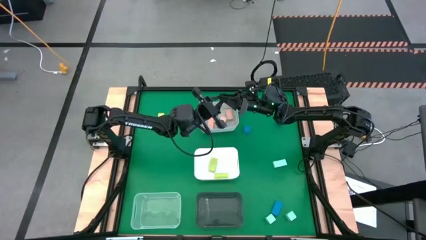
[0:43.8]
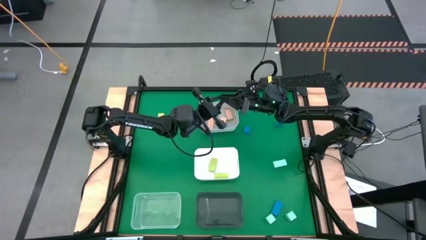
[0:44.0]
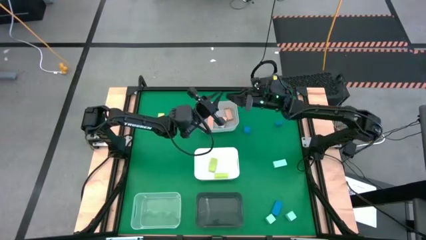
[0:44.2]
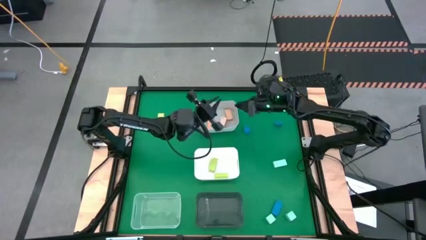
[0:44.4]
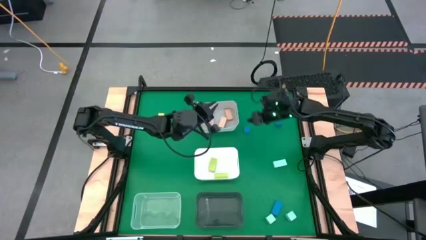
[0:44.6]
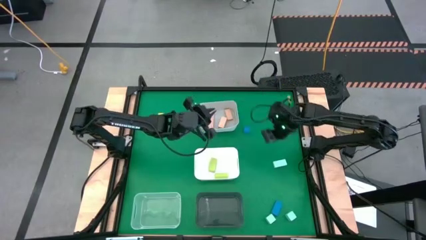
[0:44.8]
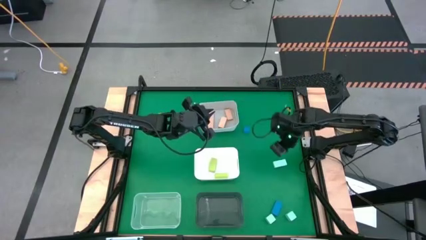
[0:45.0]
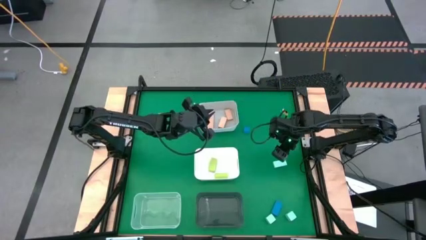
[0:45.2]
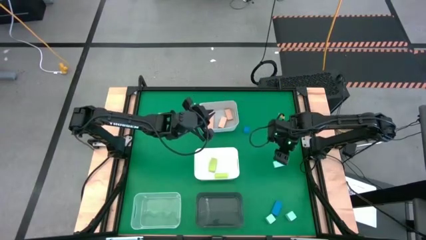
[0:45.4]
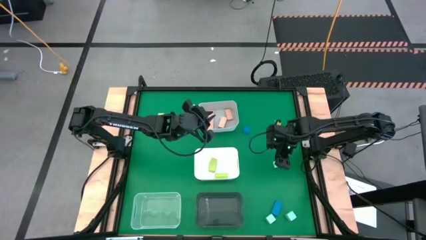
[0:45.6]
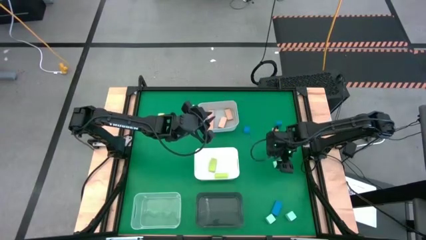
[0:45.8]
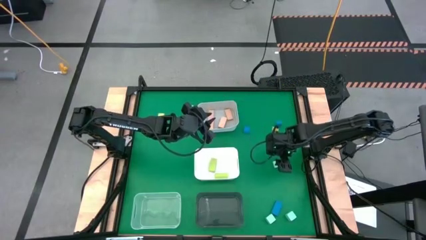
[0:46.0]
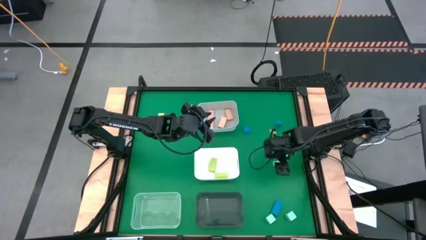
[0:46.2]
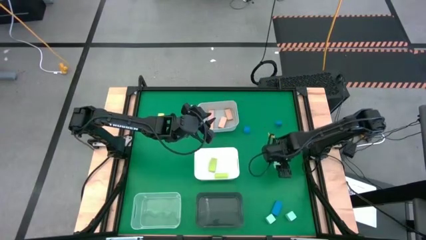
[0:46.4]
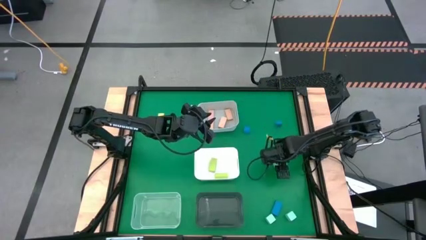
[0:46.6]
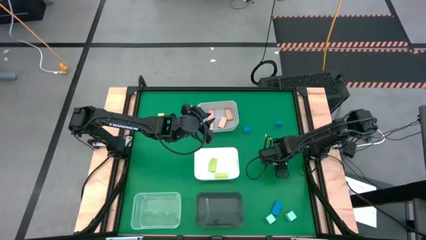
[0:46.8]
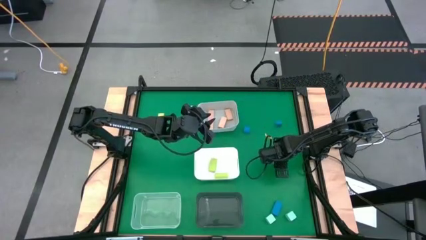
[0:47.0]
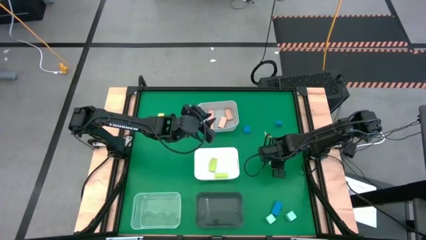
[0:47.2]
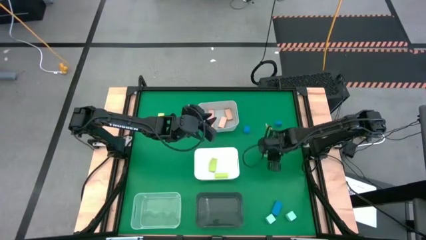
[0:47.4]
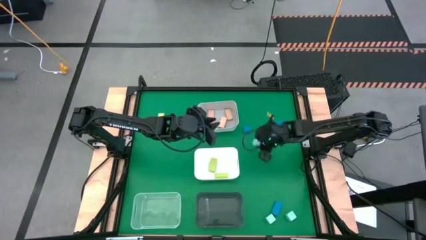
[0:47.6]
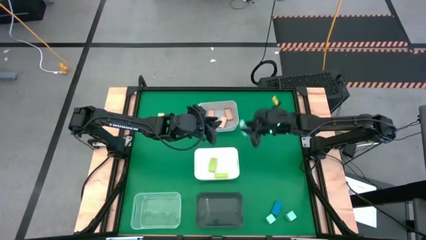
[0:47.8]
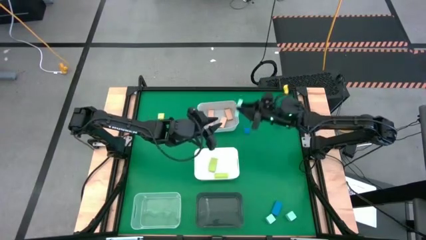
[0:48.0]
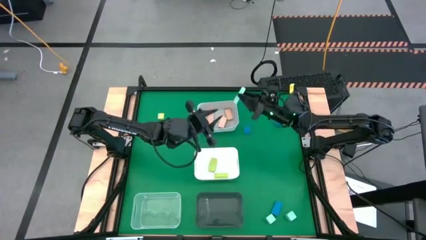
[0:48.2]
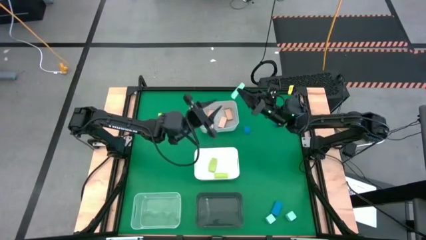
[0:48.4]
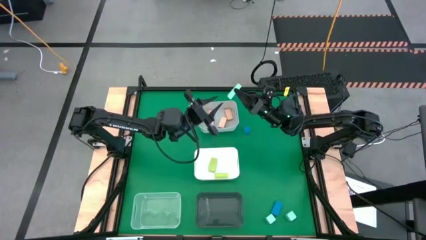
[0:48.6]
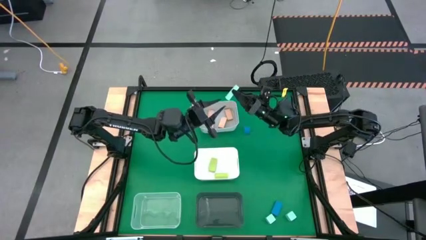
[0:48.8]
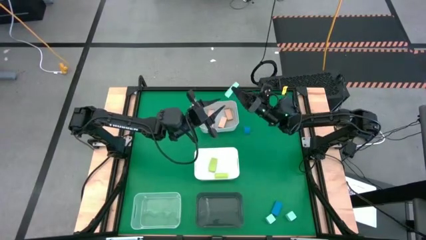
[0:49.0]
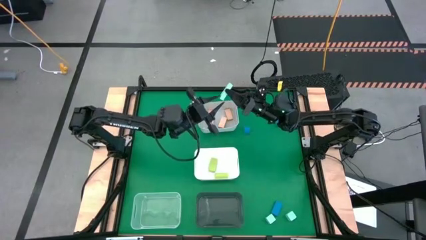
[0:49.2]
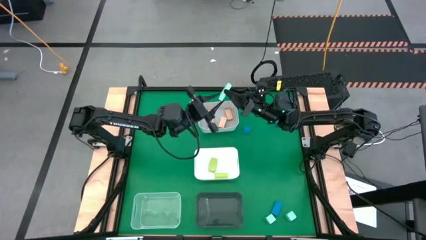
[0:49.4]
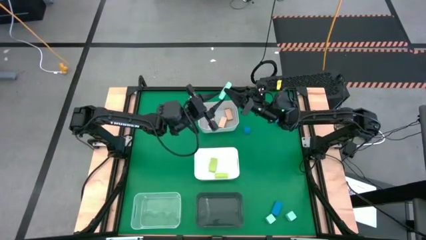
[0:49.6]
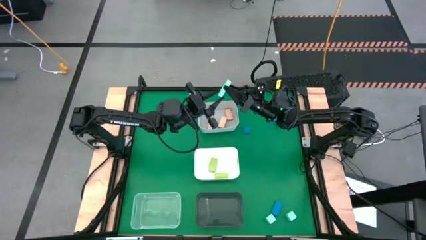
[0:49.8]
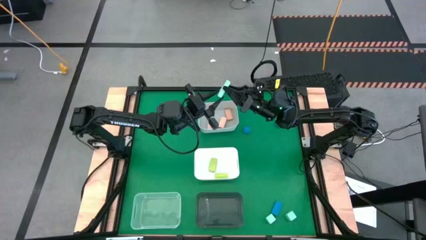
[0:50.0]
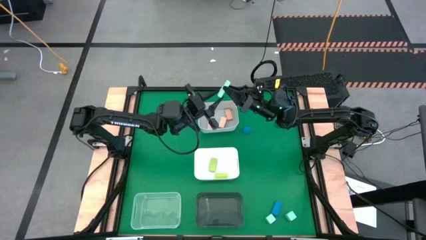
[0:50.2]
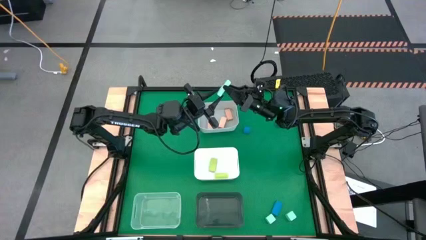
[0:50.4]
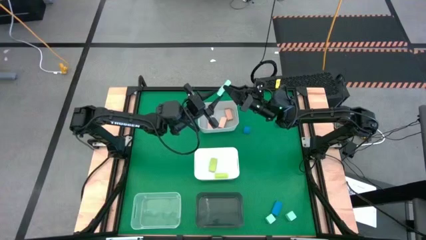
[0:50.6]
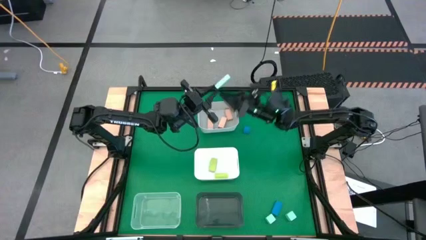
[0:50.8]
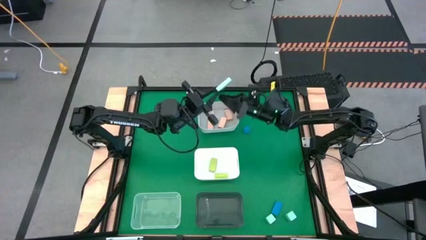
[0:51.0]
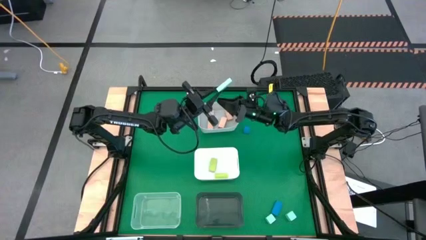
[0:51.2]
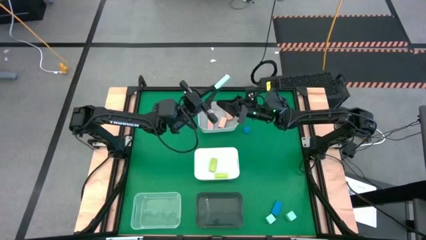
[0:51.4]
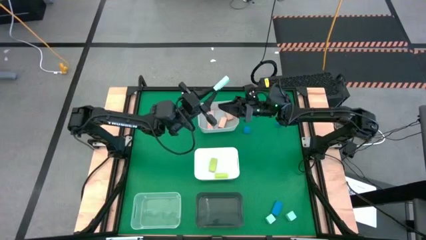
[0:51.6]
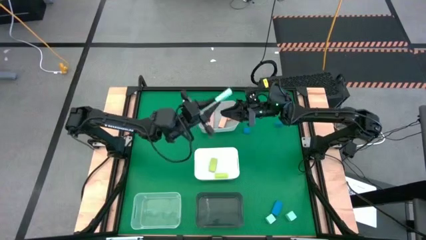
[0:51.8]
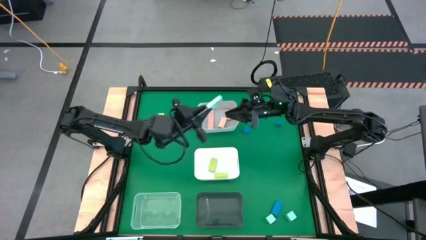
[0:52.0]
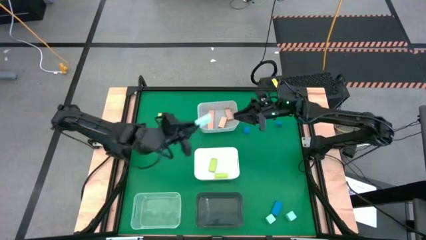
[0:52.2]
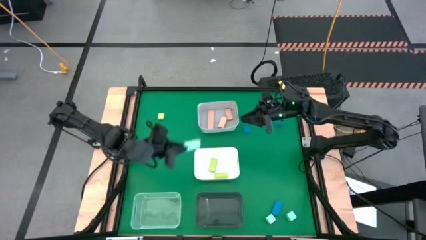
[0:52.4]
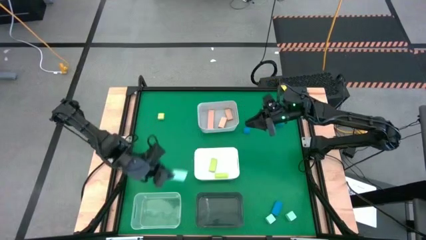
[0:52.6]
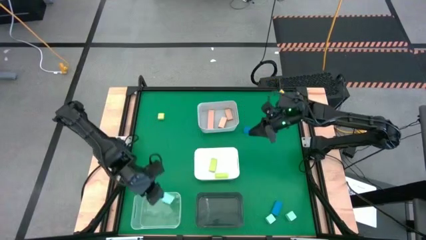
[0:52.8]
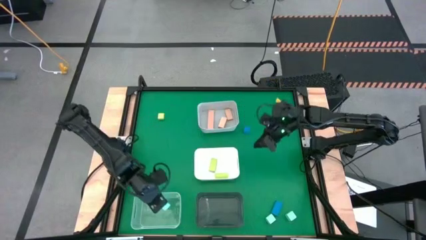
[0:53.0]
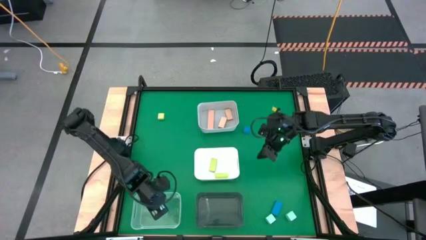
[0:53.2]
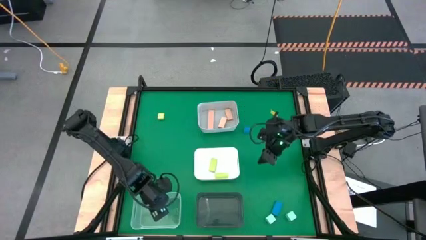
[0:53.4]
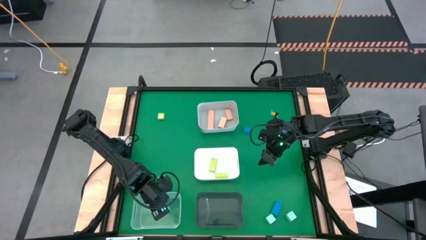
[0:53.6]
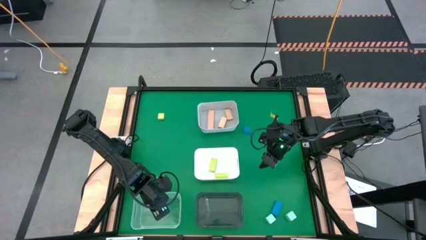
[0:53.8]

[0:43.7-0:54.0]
Task: Sort & place blocks by color
Put the top light blue block into the transparent bin
